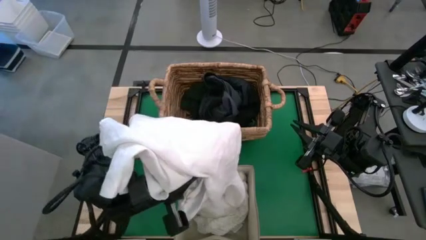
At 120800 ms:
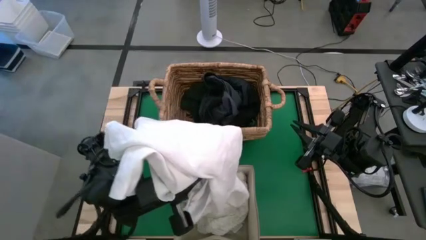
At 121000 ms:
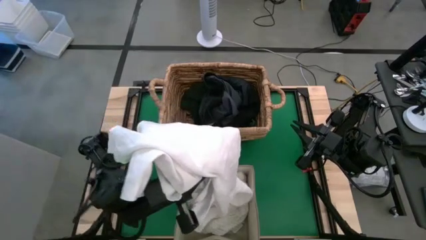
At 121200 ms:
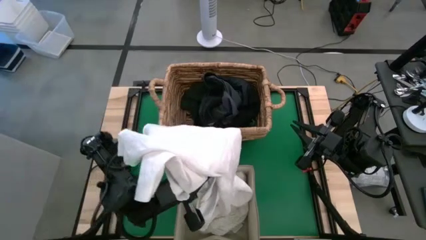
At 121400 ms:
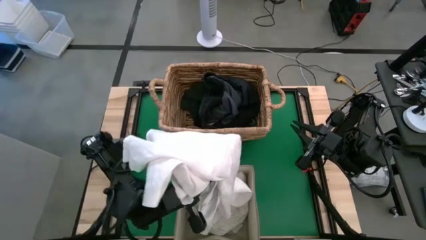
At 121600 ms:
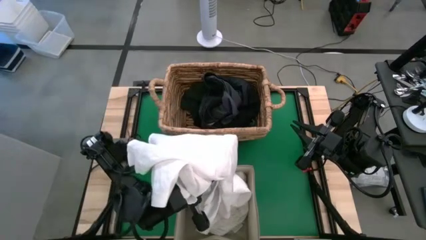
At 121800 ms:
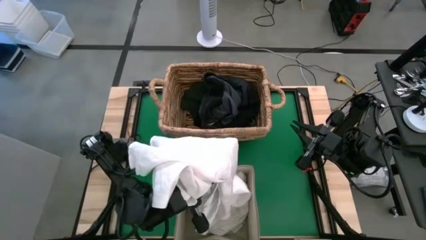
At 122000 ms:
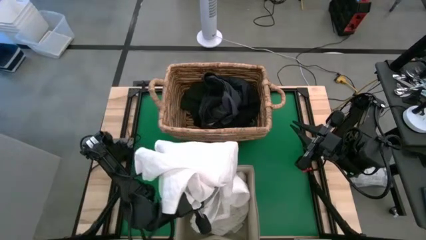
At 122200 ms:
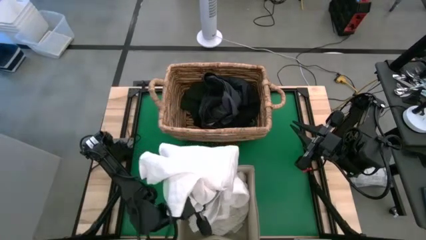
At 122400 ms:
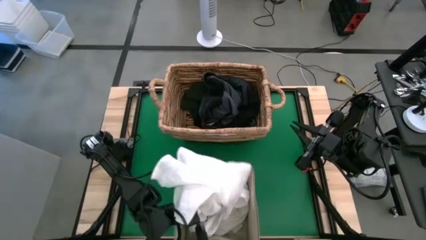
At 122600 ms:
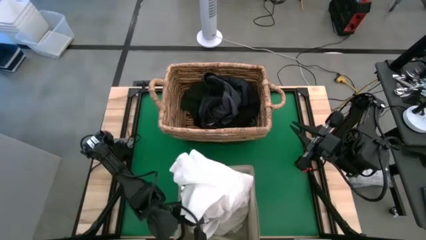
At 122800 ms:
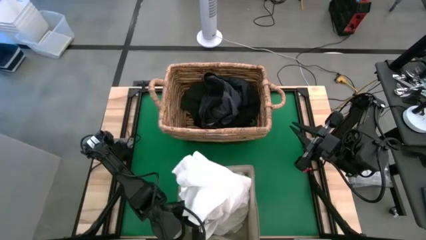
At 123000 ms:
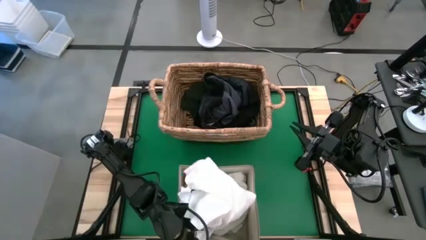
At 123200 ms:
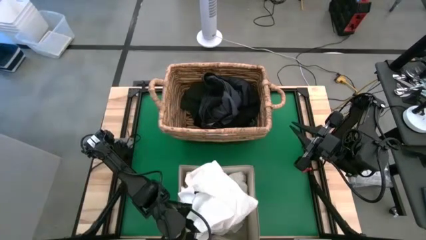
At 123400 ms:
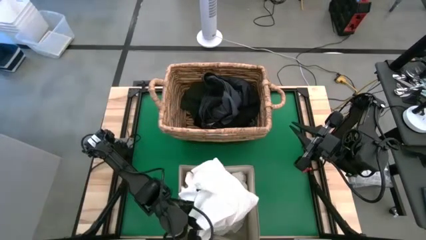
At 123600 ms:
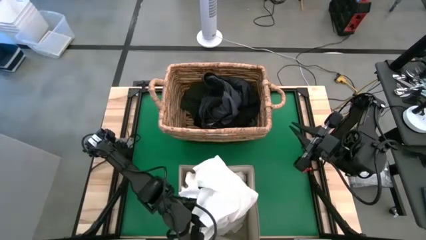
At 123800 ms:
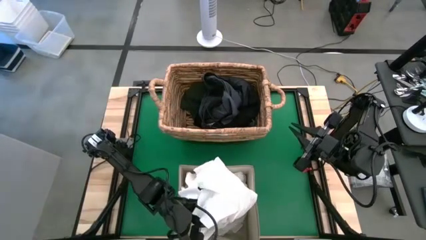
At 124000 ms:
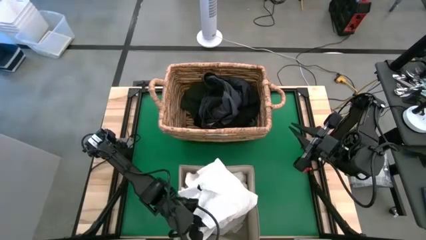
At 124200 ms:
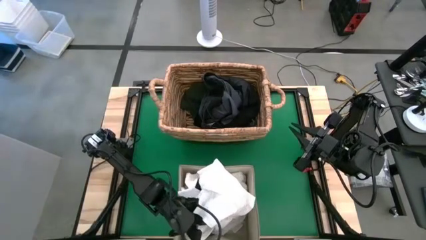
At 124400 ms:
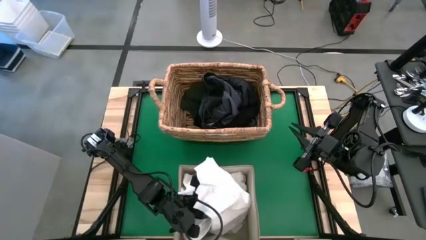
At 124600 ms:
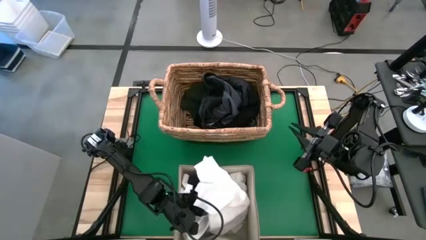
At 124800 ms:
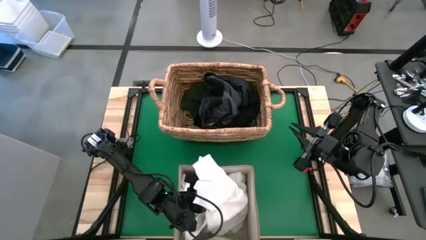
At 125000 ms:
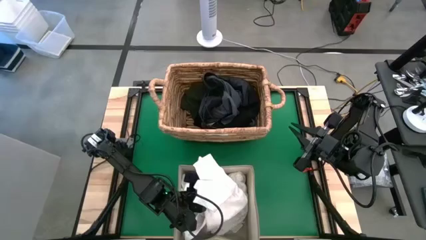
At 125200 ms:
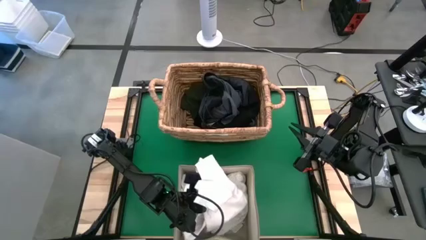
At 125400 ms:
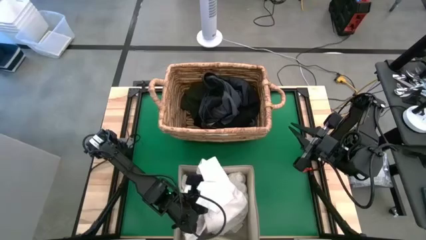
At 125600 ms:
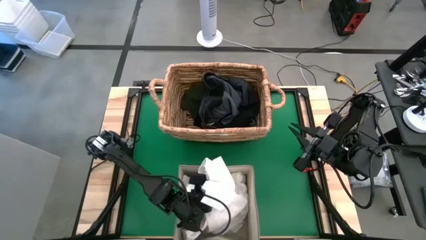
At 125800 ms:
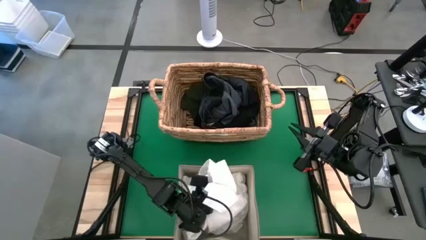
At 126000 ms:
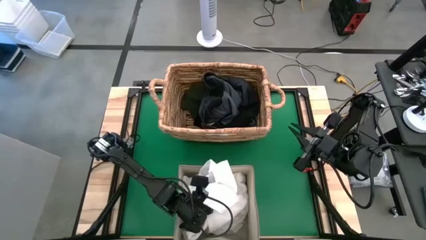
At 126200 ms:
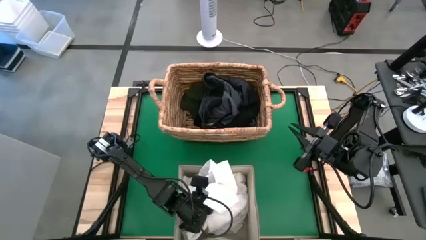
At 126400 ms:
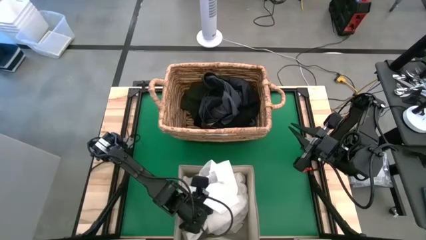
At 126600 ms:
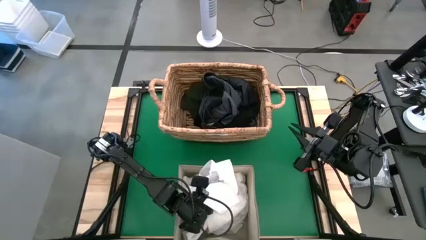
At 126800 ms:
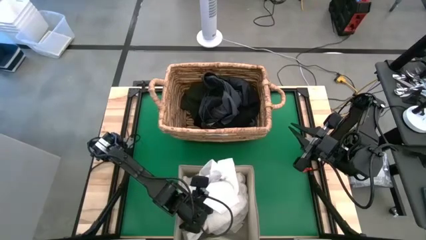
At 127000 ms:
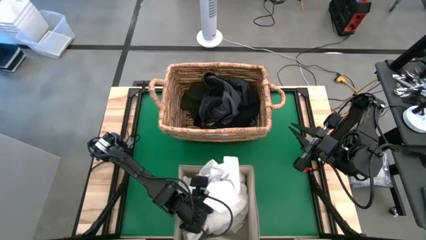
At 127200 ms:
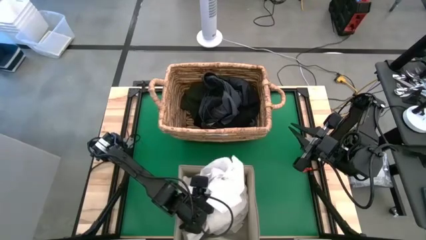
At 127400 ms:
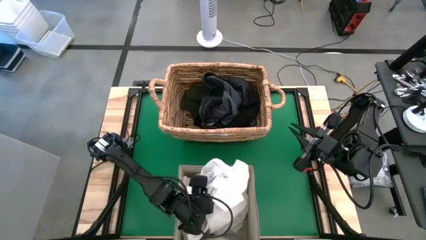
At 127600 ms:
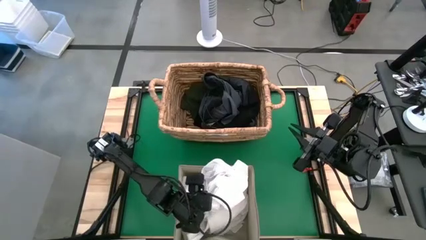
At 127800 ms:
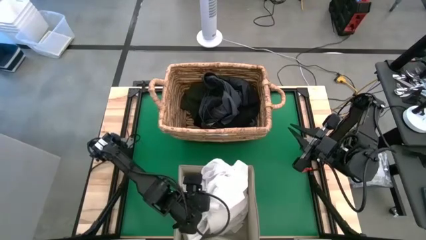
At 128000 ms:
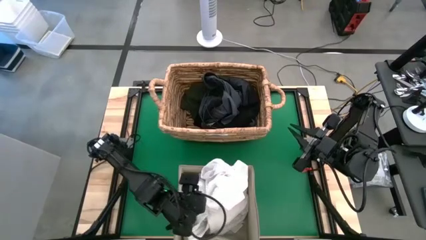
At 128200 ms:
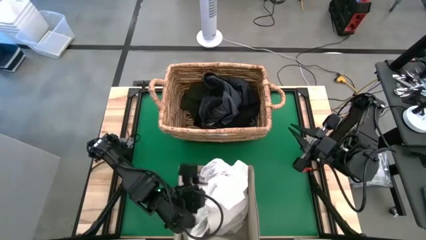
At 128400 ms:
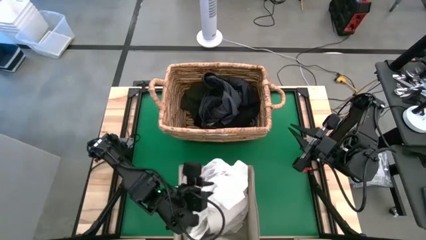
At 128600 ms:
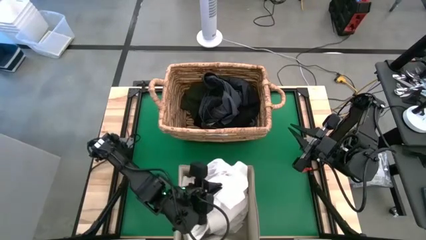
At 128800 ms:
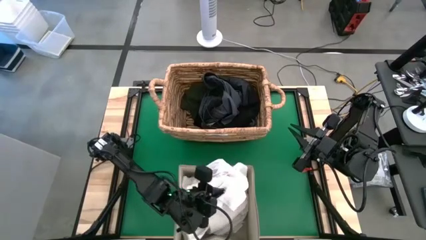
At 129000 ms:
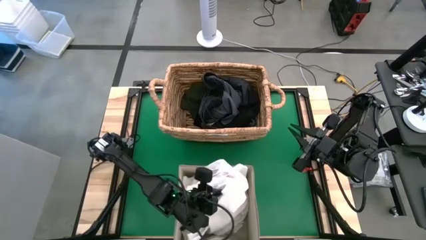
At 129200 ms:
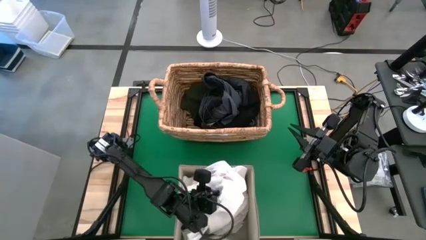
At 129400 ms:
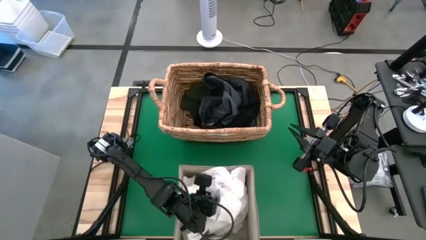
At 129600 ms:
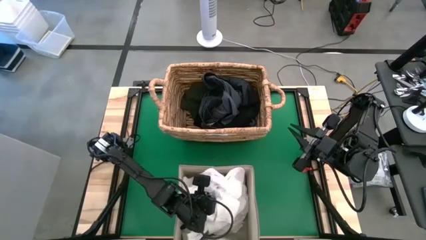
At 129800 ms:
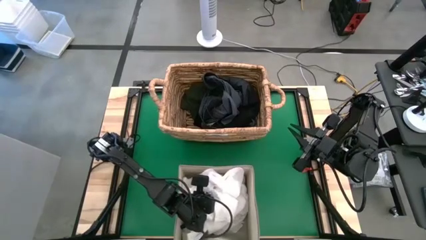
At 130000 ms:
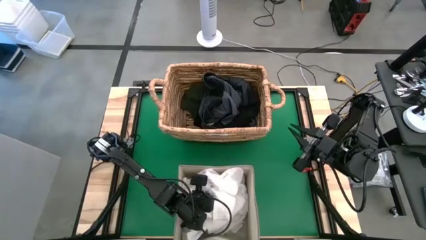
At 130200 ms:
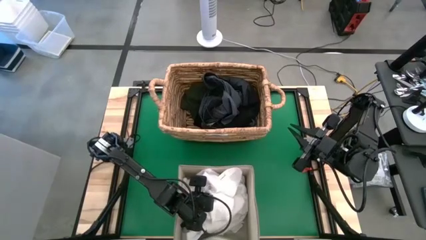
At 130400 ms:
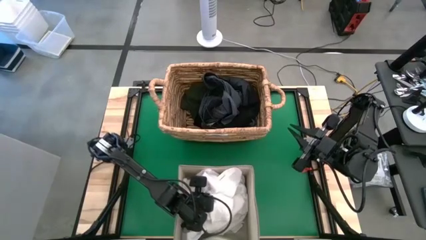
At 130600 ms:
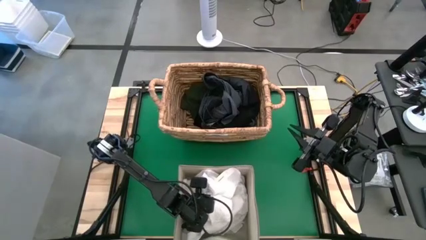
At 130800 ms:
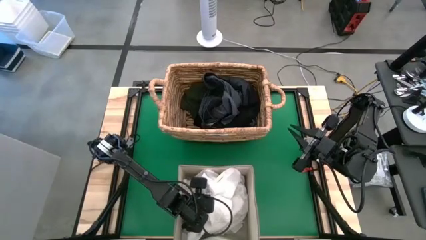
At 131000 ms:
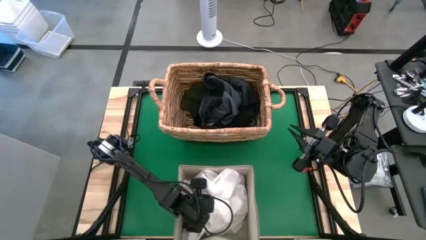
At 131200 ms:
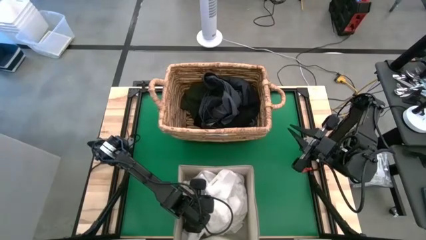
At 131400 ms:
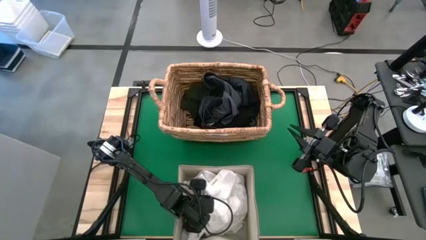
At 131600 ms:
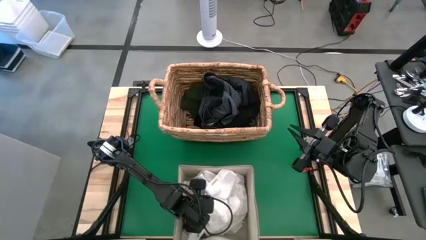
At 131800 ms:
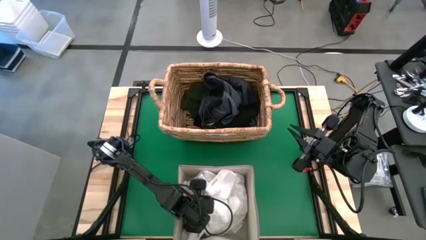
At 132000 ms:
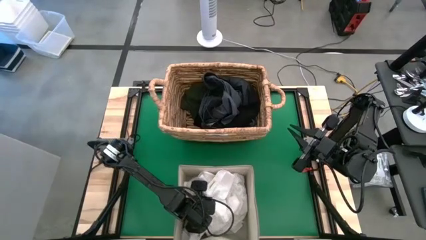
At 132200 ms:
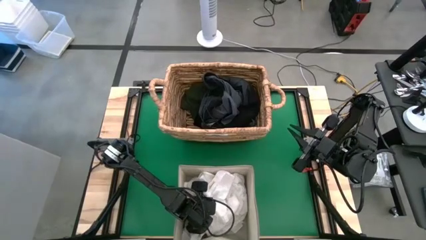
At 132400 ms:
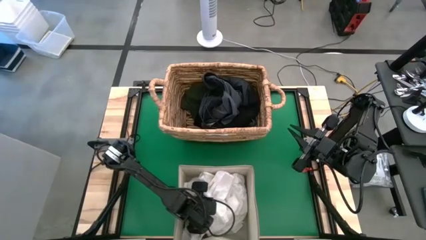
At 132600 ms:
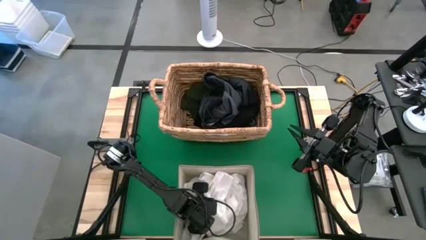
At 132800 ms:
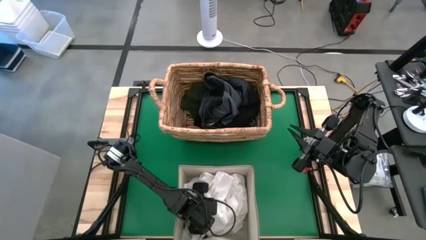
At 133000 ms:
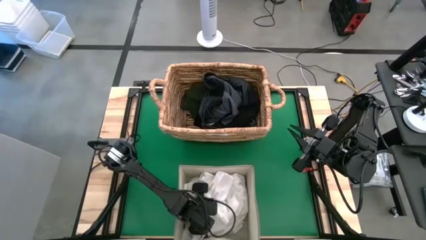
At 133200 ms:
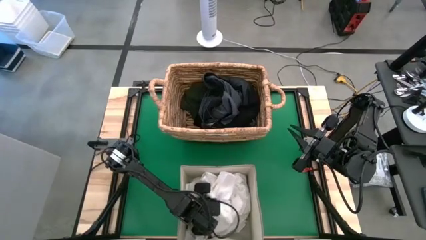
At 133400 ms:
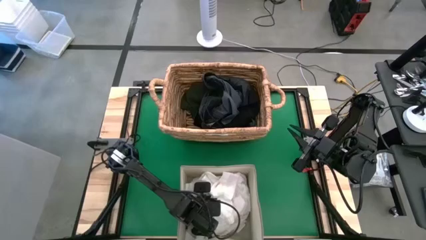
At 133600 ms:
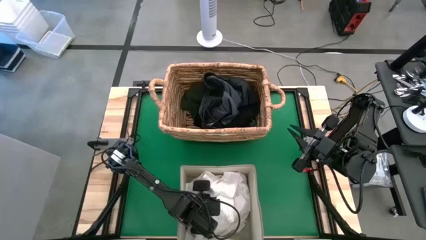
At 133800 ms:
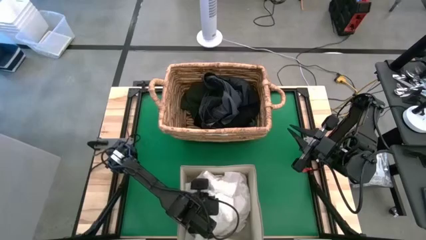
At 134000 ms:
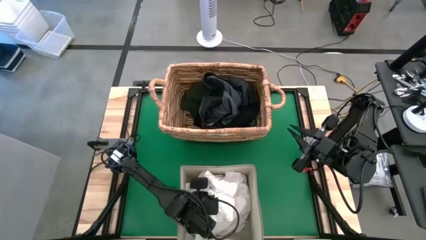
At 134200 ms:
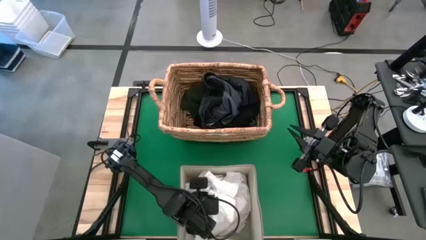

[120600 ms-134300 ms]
Put the white shirt into the white laundry organizer
